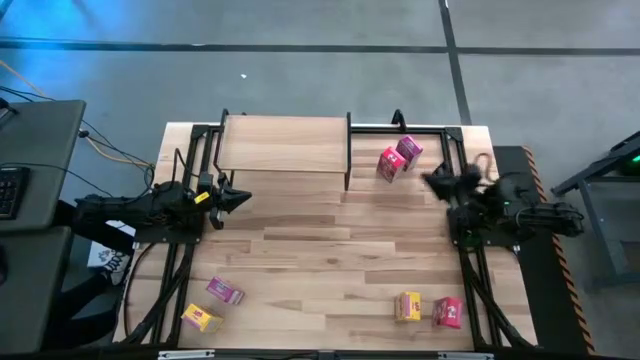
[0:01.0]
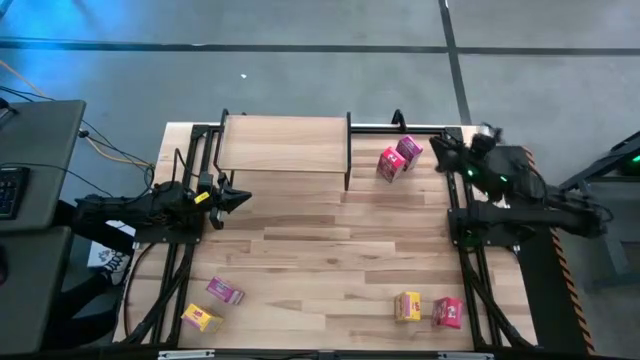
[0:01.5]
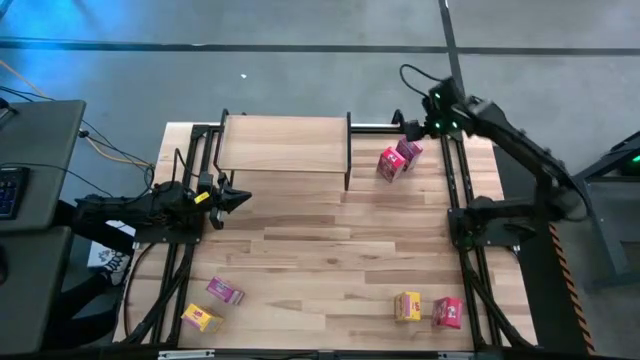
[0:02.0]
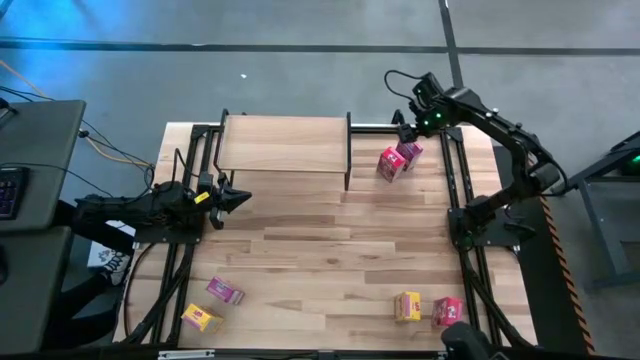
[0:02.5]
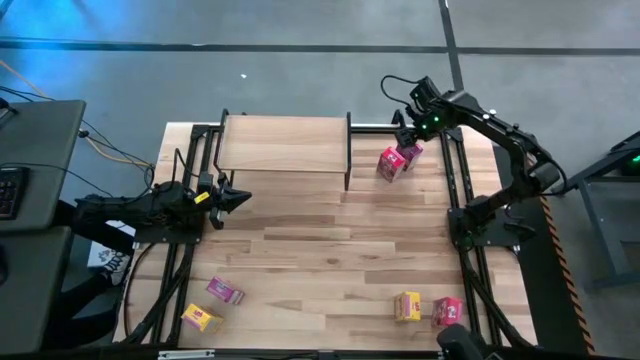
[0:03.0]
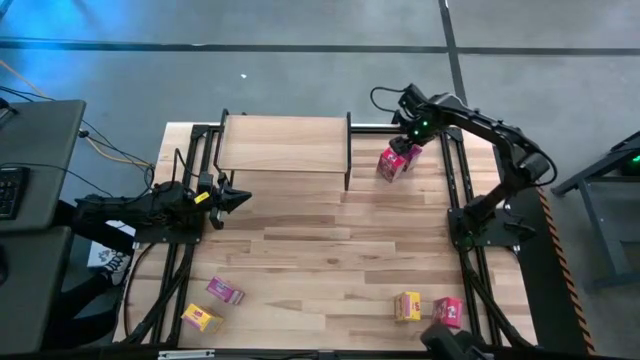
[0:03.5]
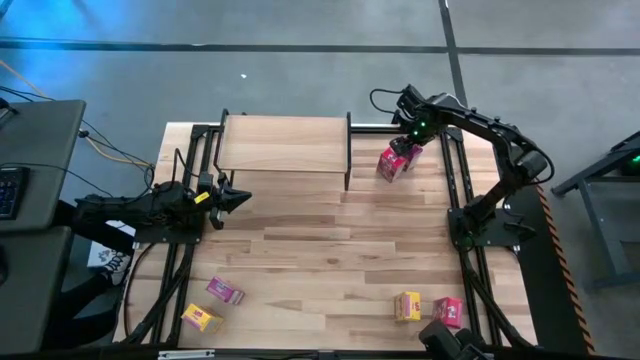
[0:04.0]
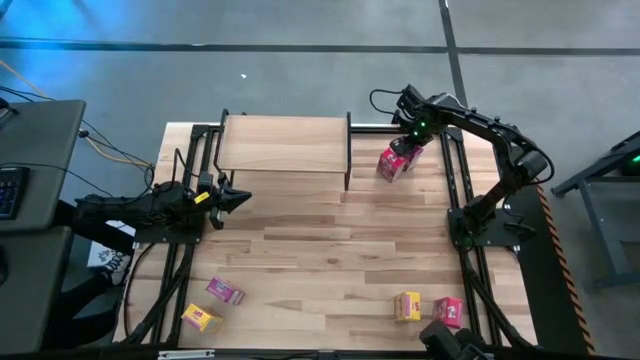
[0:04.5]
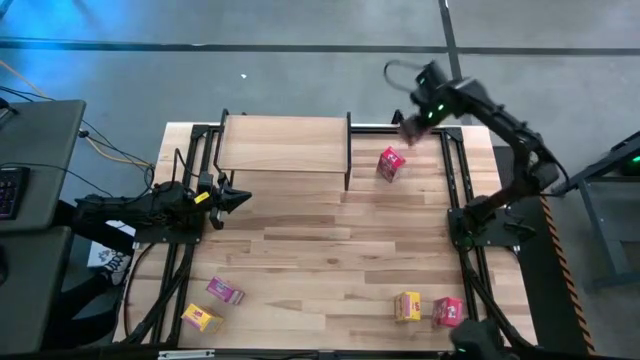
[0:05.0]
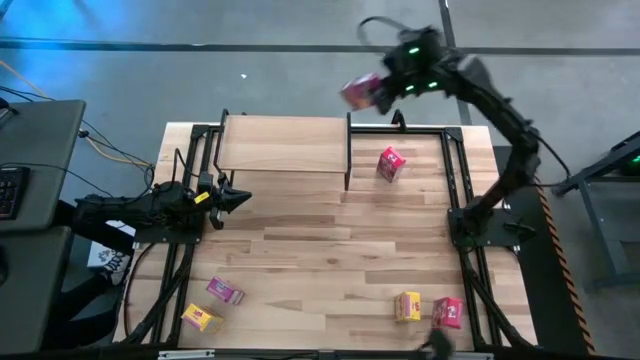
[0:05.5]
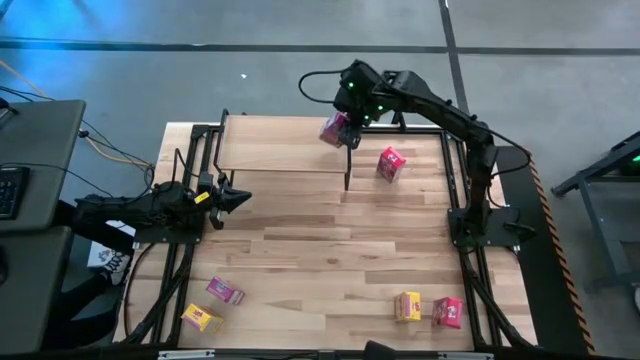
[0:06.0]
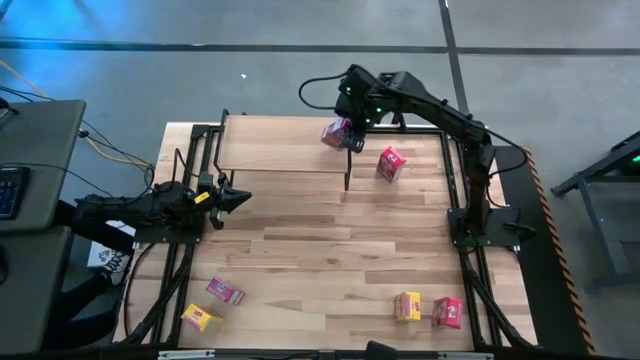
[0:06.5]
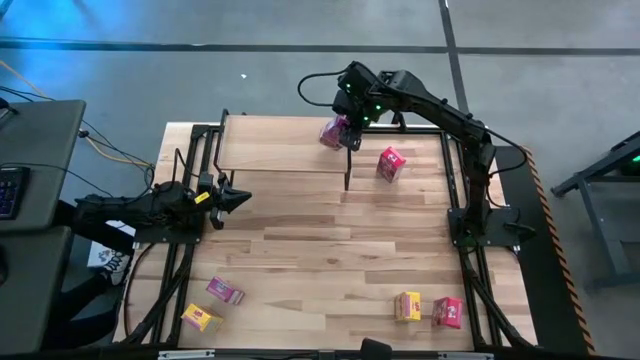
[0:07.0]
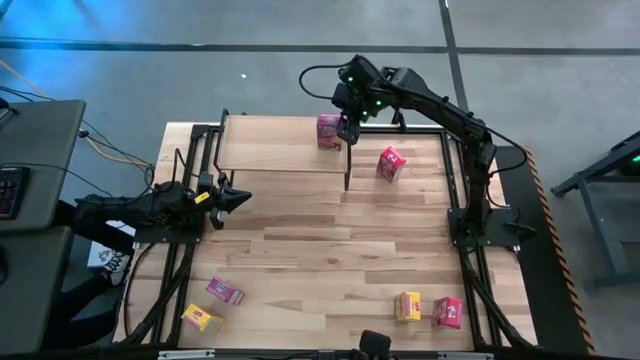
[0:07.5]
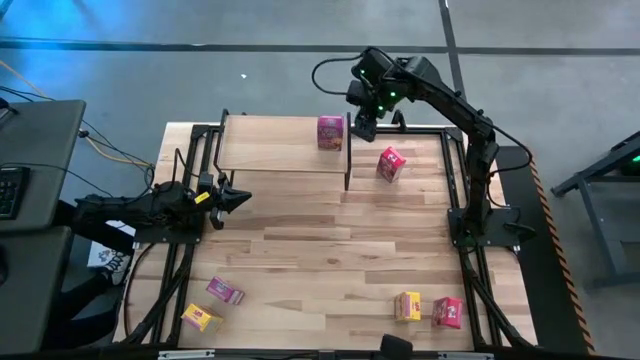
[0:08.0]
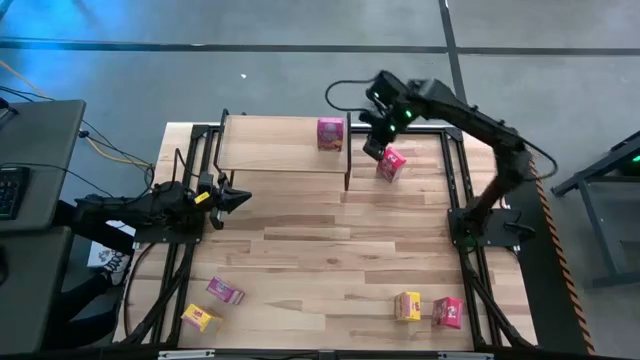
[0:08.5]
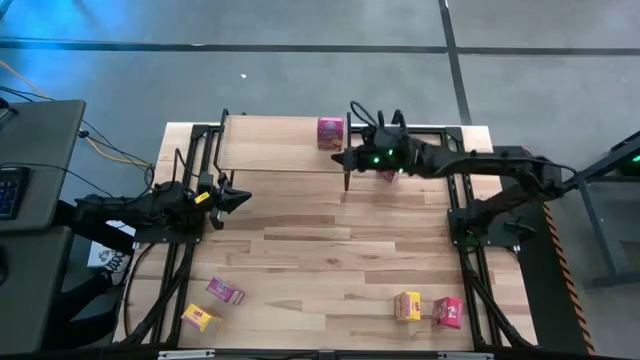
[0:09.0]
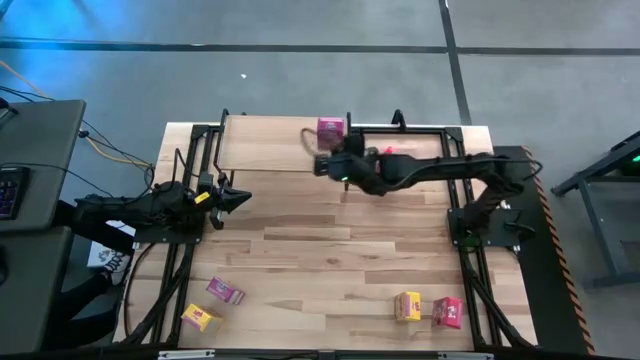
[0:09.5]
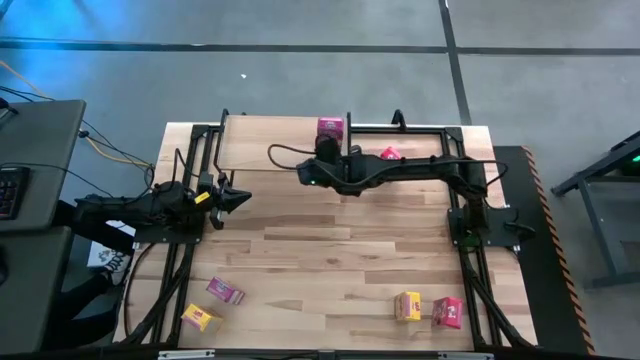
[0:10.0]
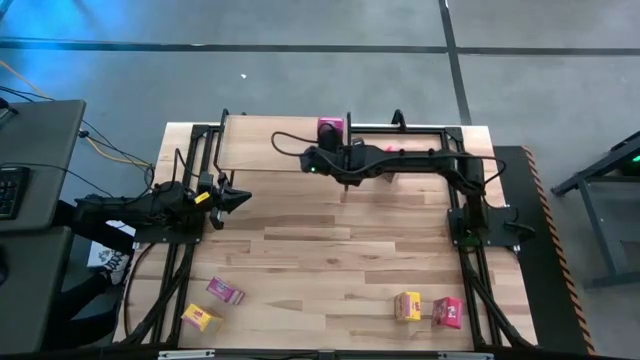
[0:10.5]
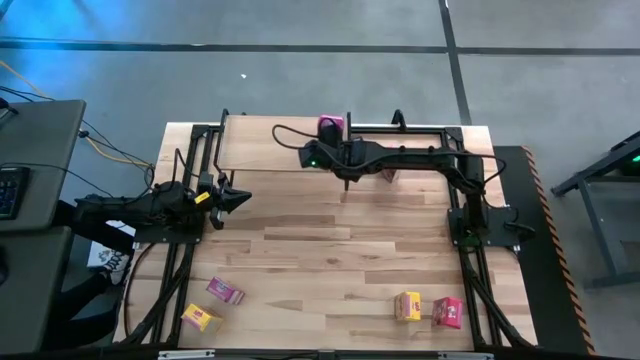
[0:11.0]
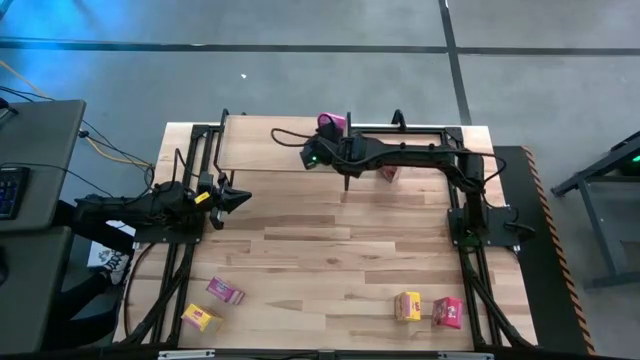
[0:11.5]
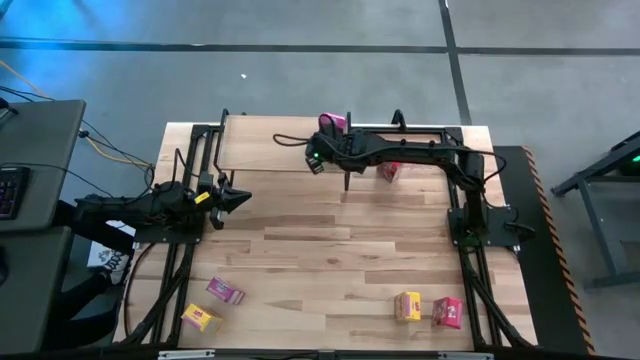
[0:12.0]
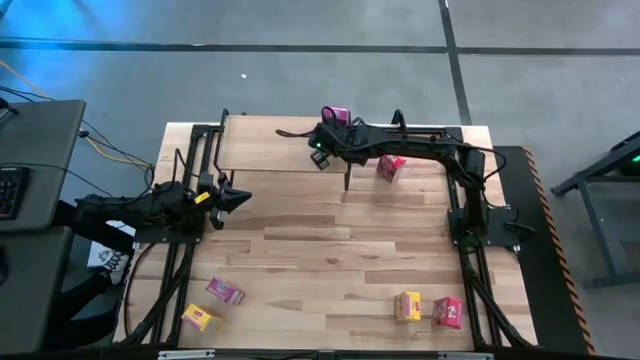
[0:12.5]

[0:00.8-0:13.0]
Task: Stack cereal on shelf
Put the top purple cereal box on the shelf
